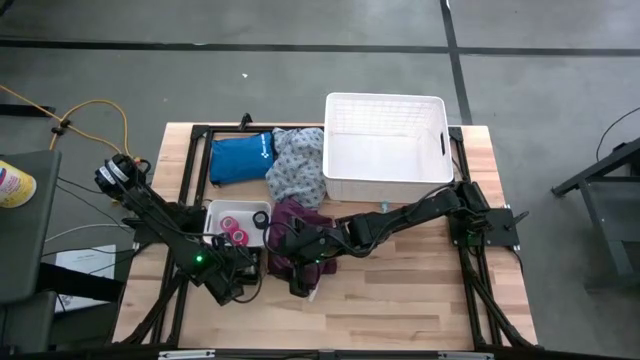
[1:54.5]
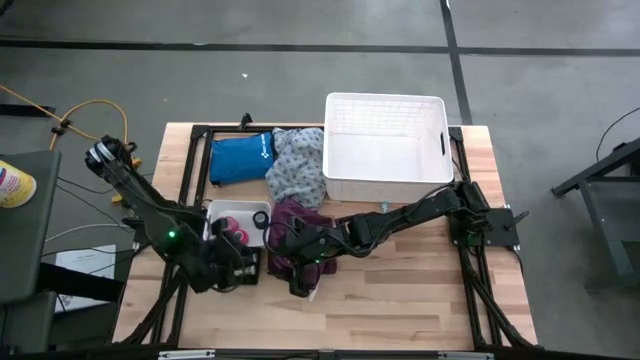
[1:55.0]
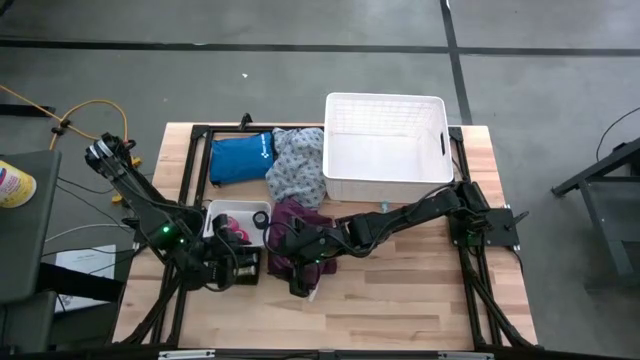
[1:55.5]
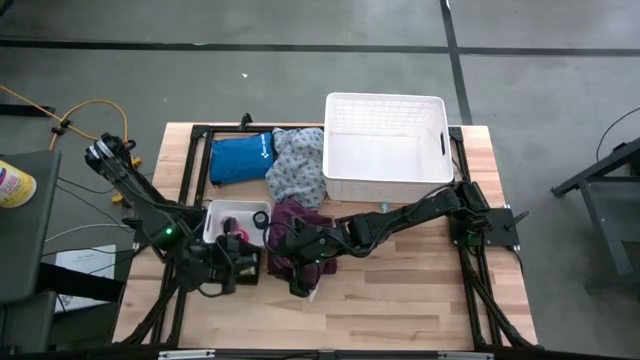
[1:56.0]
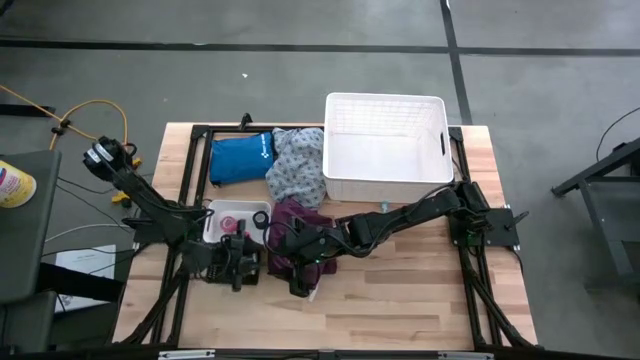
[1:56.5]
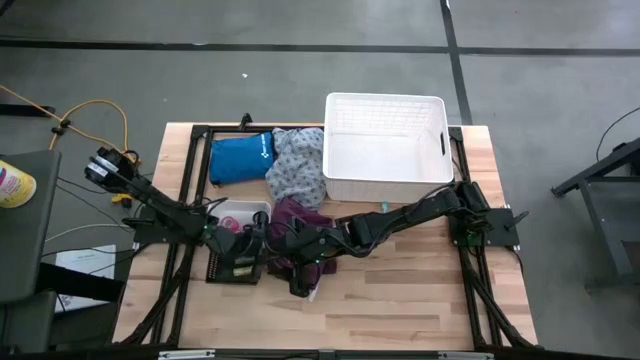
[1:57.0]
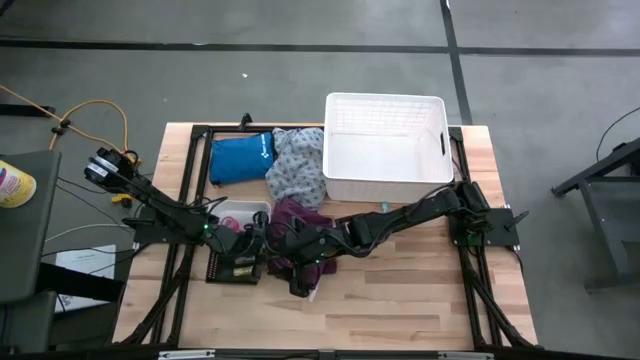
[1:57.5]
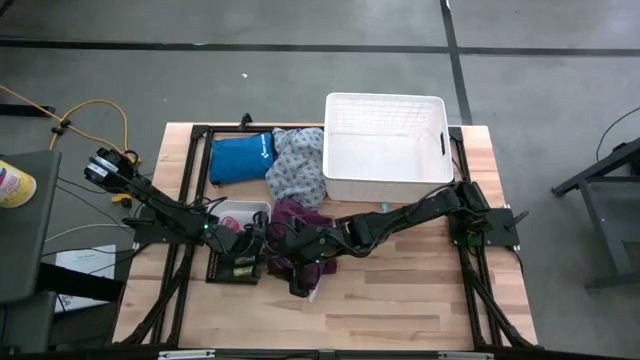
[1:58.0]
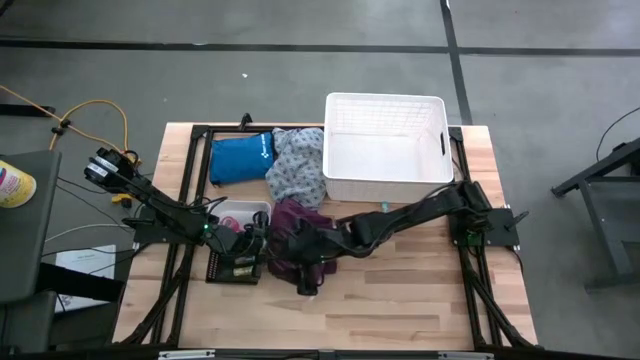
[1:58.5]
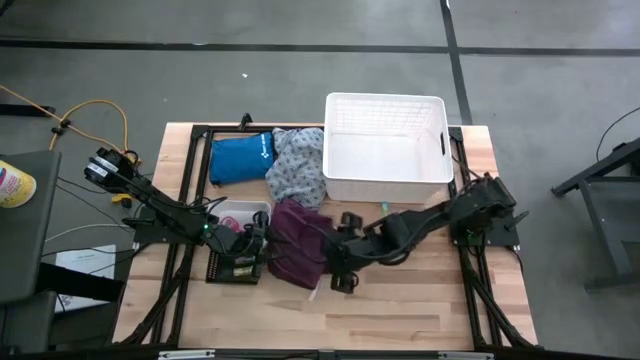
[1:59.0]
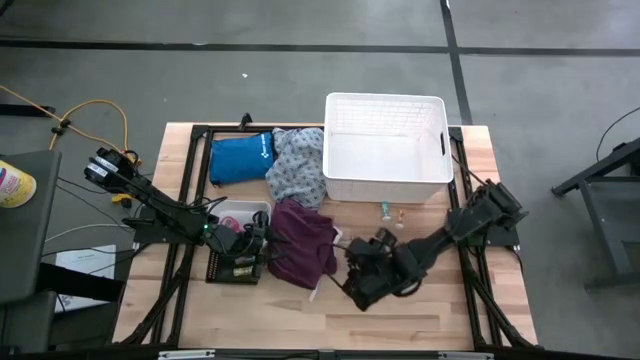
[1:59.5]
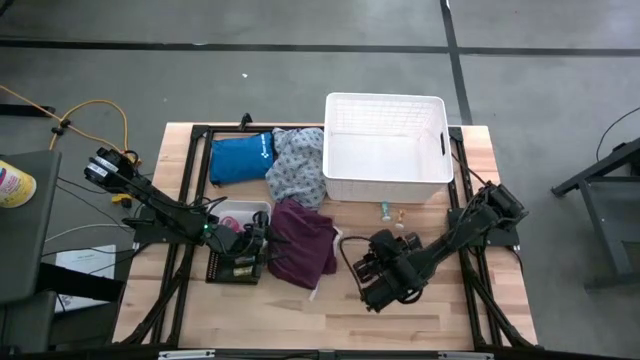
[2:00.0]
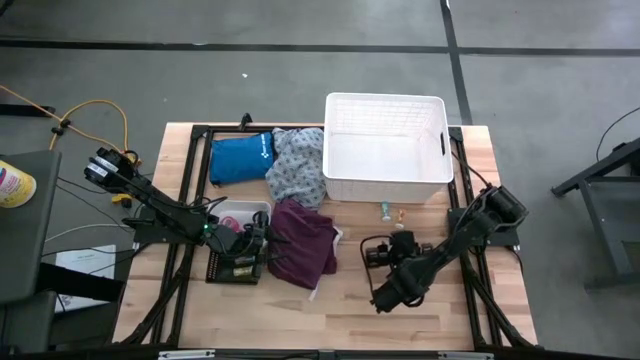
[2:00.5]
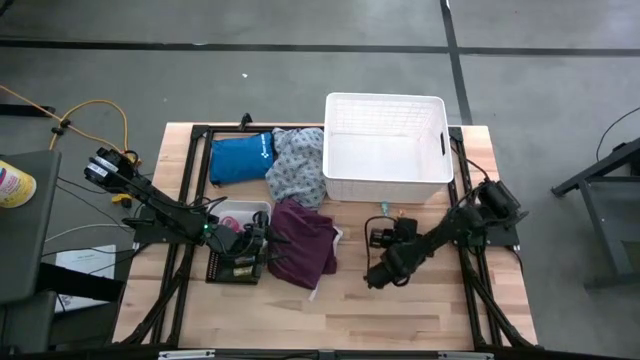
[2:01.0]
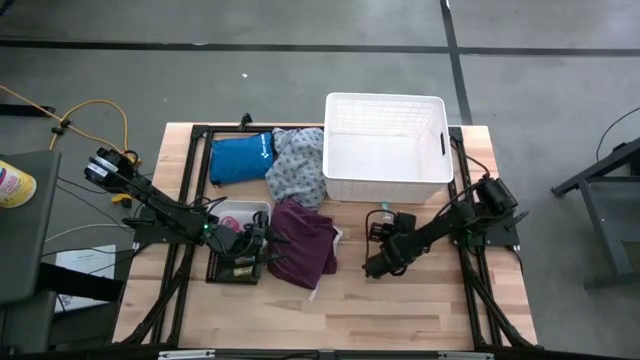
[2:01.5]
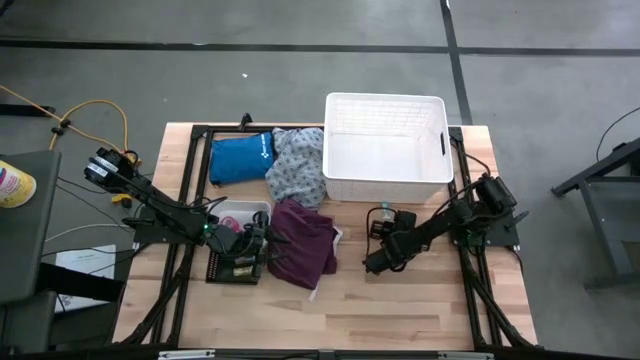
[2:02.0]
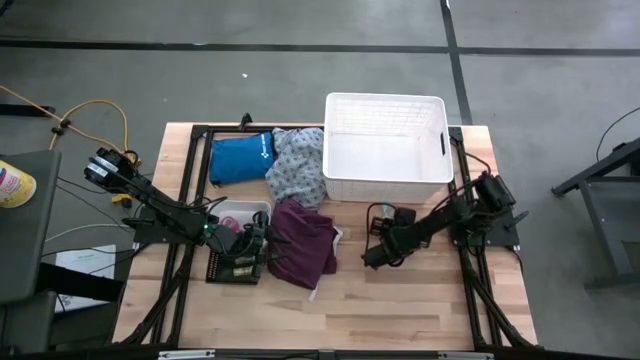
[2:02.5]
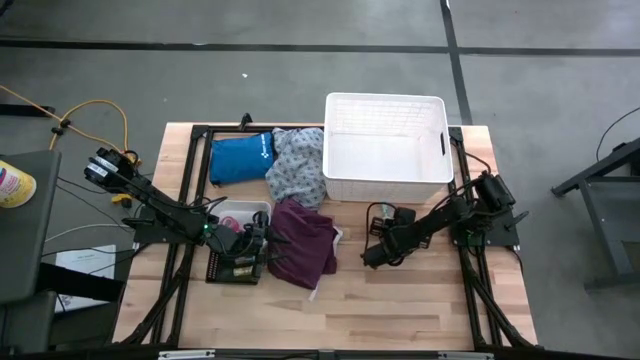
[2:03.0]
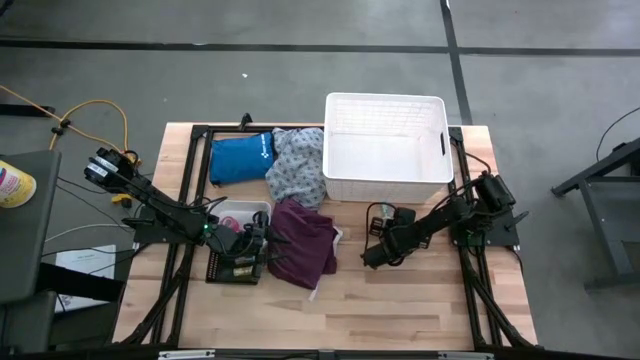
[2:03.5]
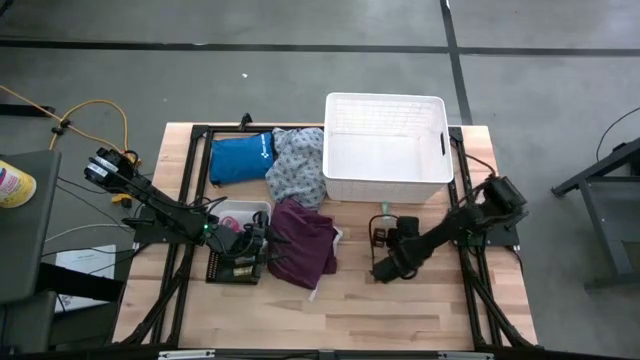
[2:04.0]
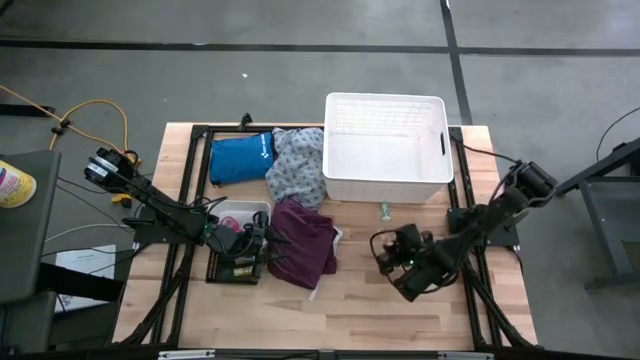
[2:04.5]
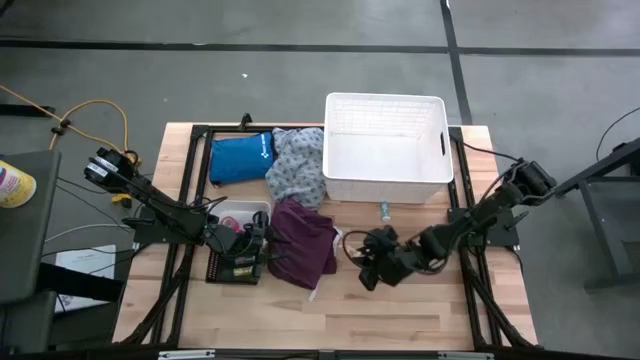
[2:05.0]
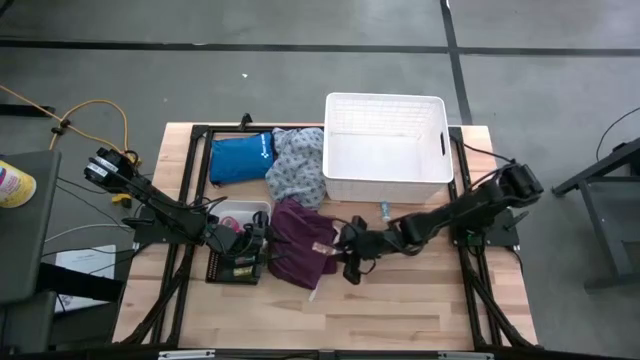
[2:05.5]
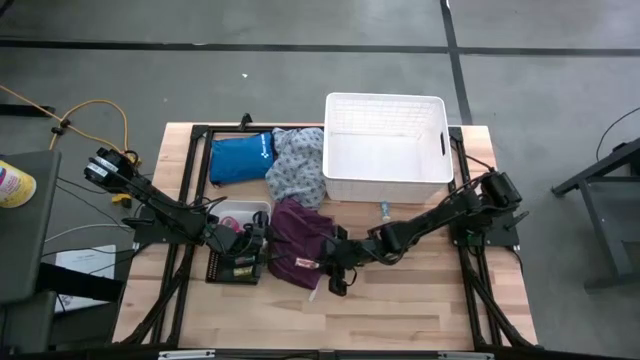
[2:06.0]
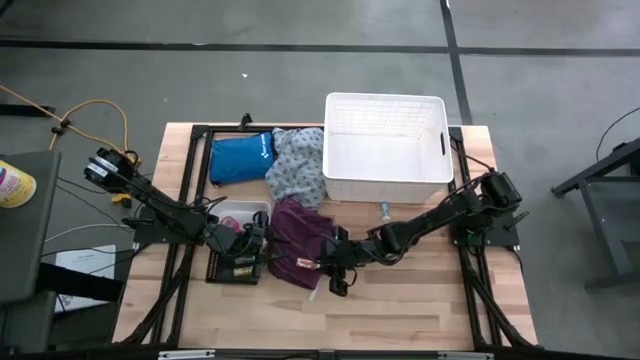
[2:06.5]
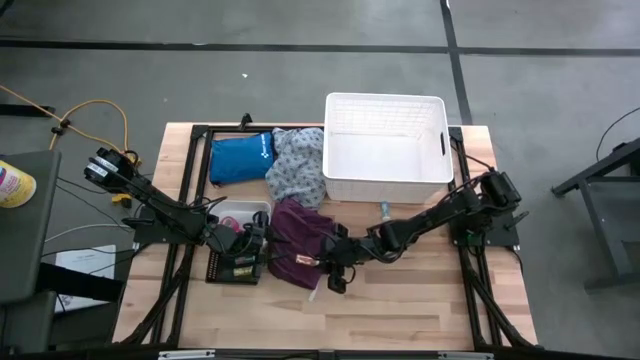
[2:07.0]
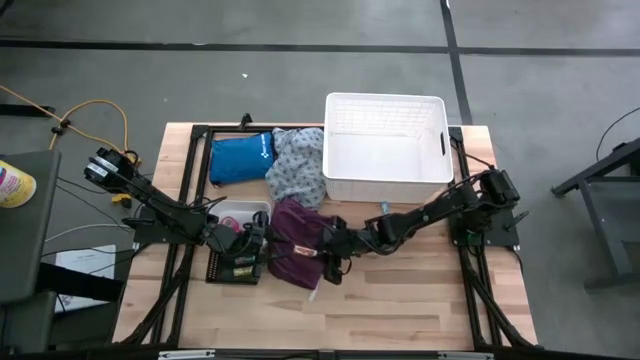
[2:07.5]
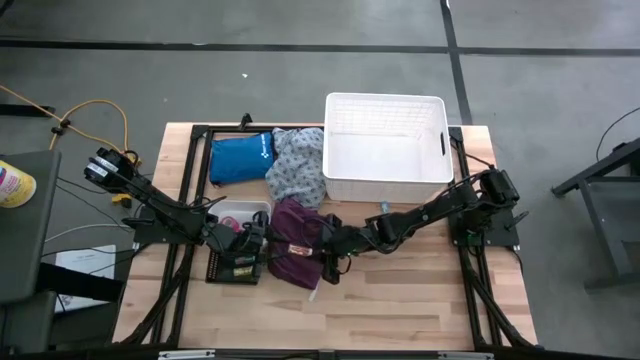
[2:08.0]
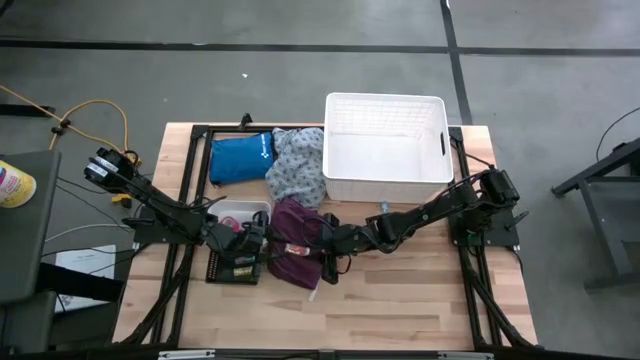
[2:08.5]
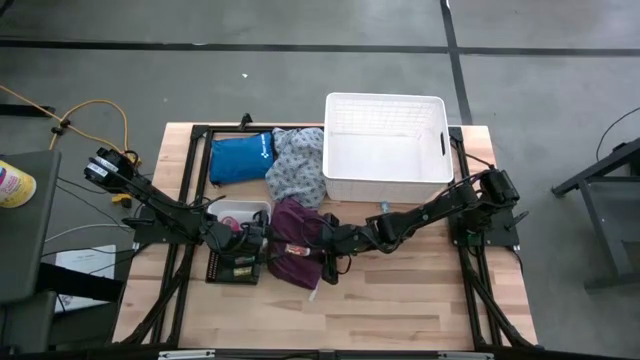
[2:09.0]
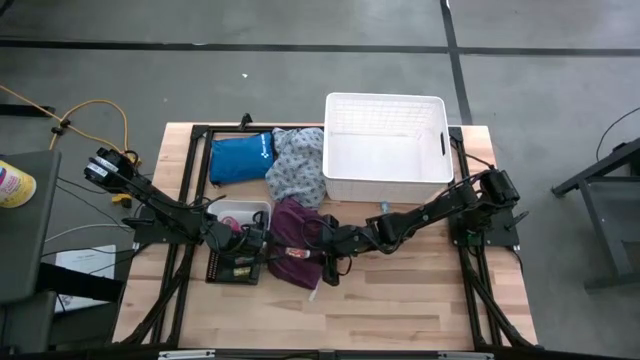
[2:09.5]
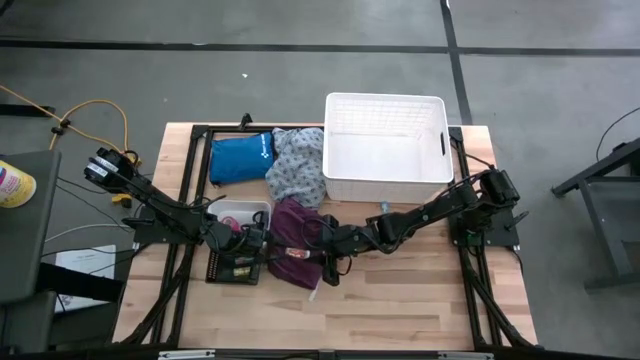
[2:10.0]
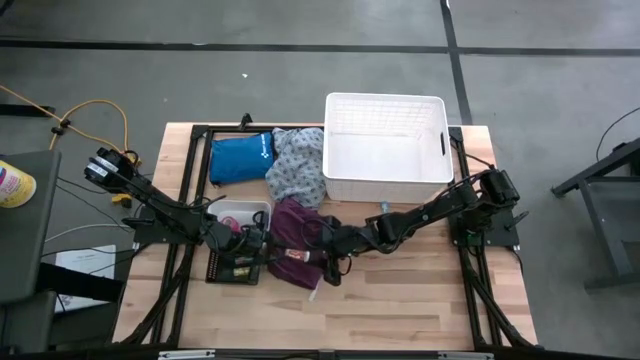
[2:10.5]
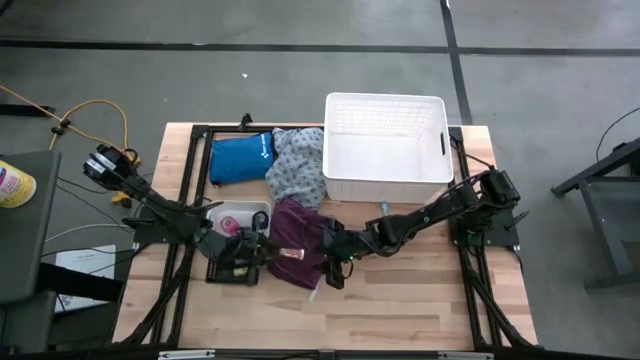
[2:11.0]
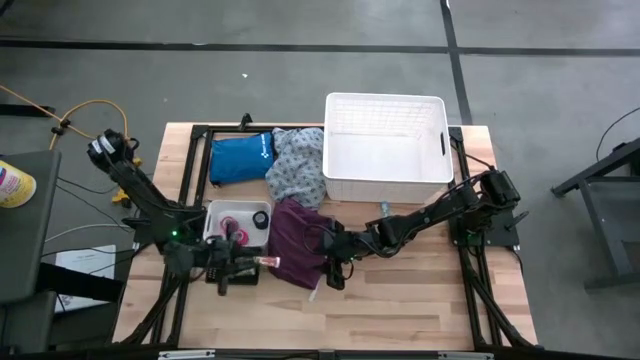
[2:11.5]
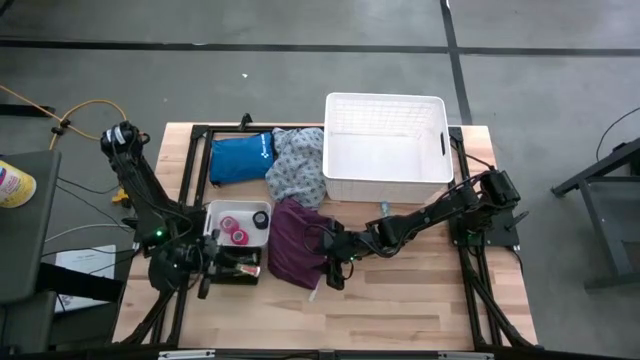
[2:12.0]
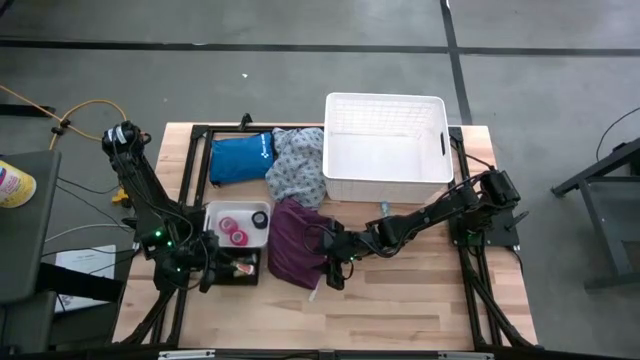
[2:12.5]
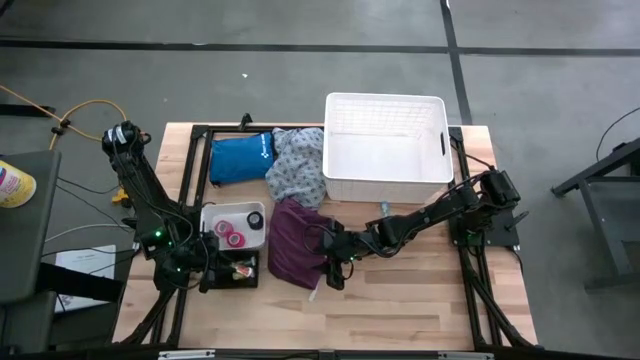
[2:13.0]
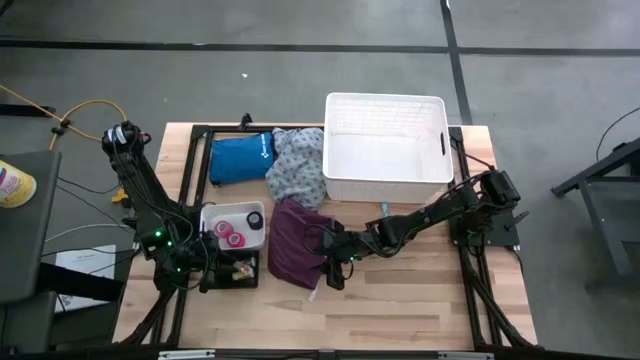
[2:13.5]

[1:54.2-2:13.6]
Task: Pick & place medical supplies in basket/bin
Put the yellow pill bottle into the black bin

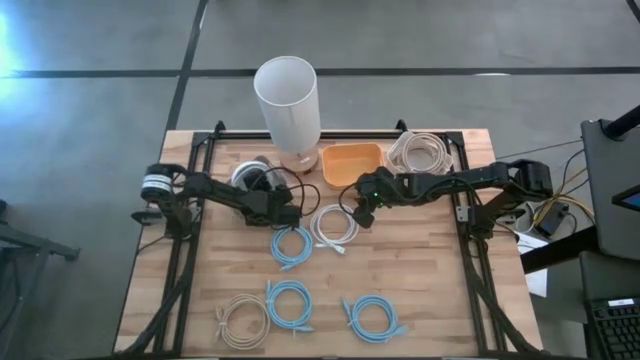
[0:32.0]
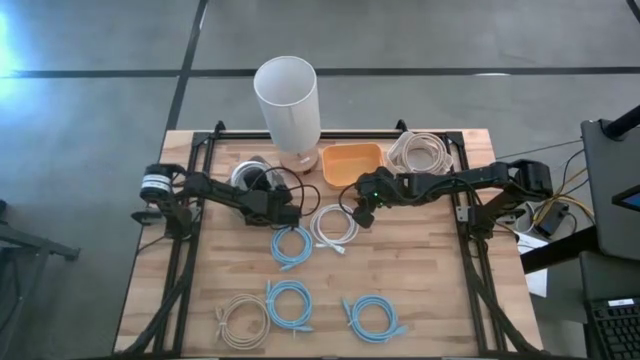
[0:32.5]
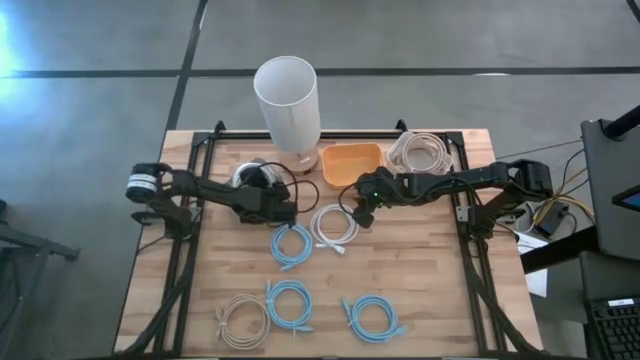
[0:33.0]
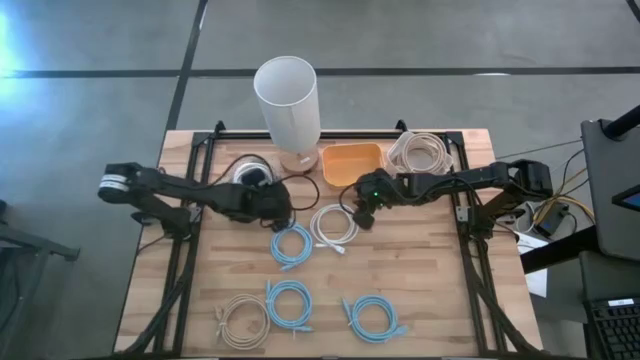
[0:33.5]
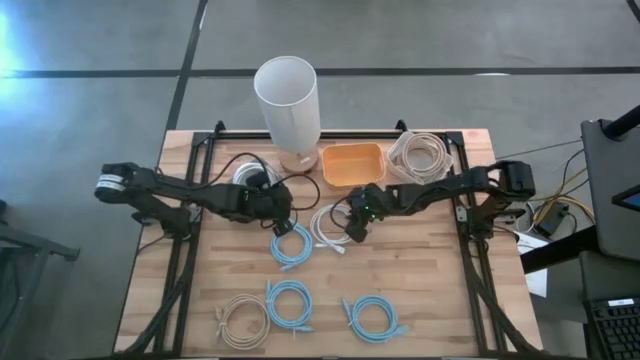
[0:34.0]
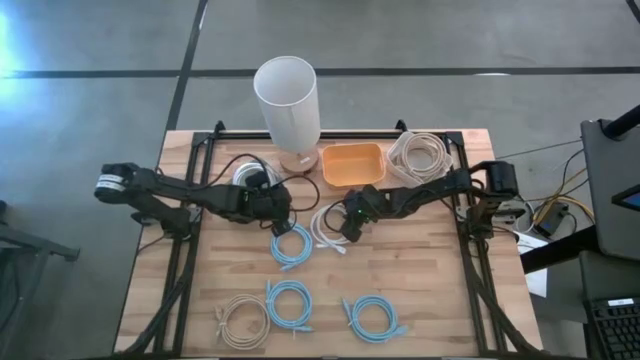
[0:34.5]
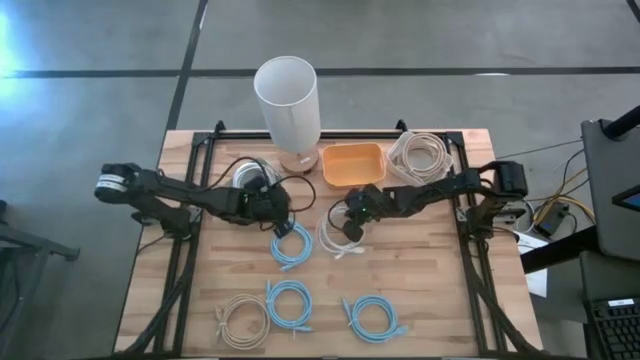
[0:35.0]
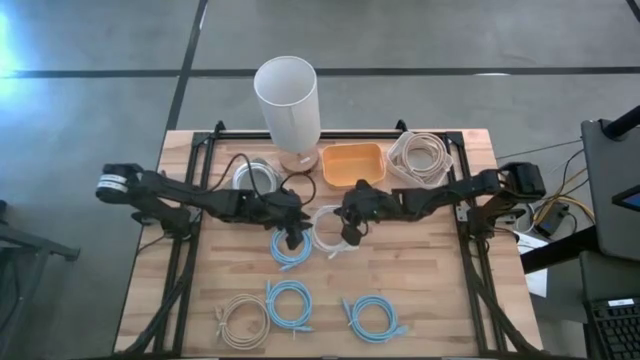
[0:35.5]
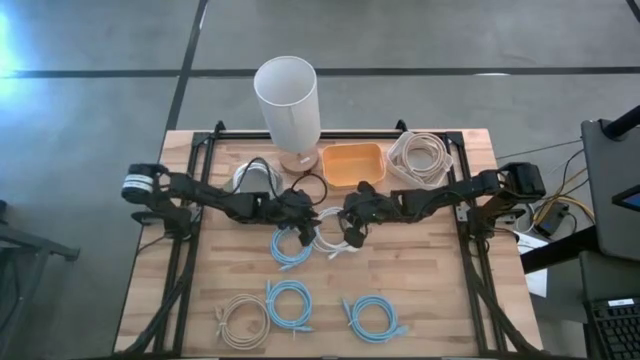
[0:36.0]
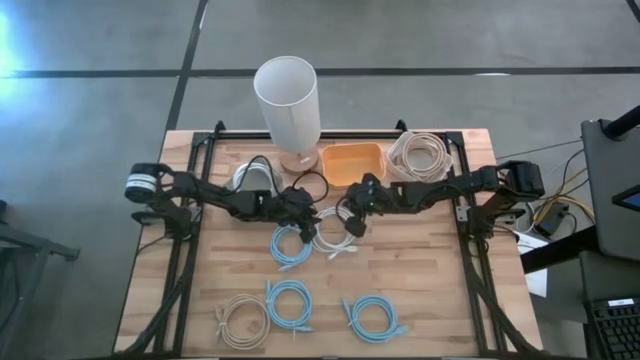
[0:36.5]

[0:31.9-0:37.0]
Task: Sort HDMI cables
Put the white HDMI cable into the grey bin
